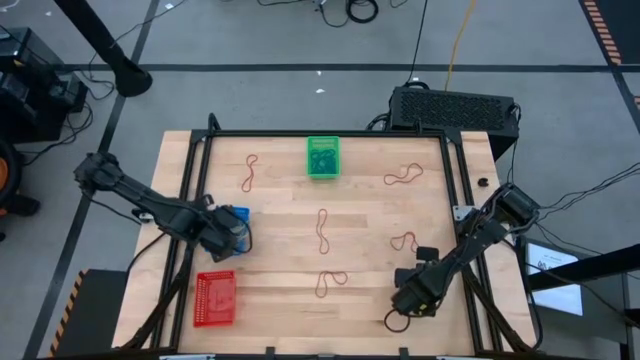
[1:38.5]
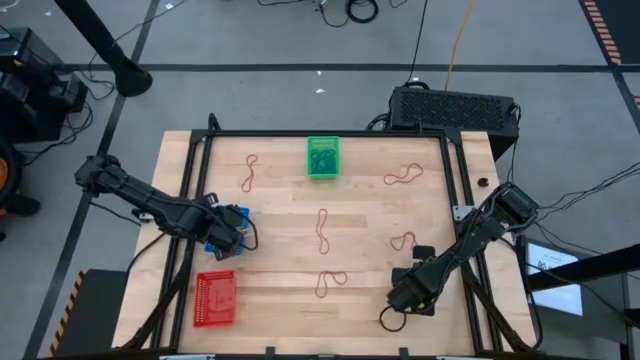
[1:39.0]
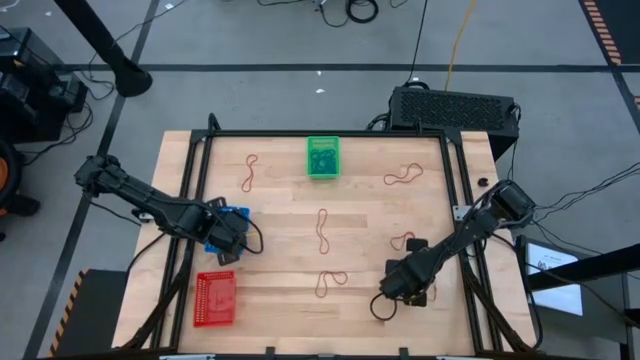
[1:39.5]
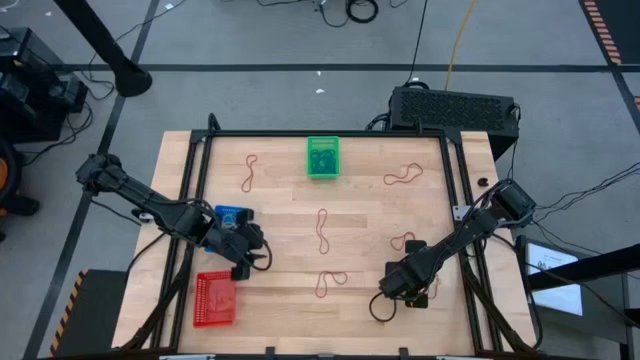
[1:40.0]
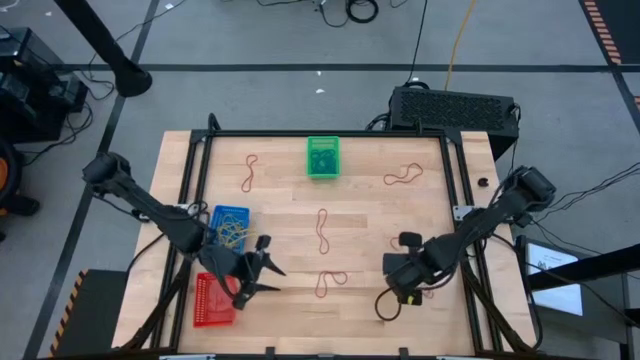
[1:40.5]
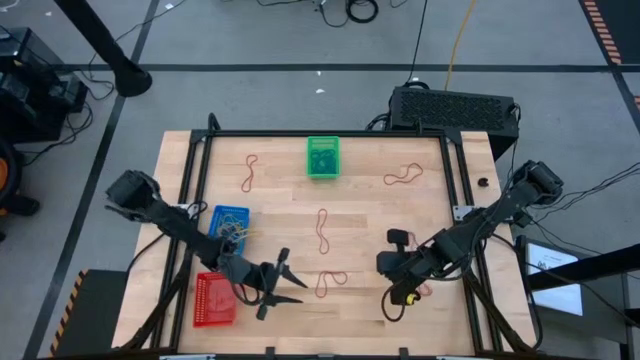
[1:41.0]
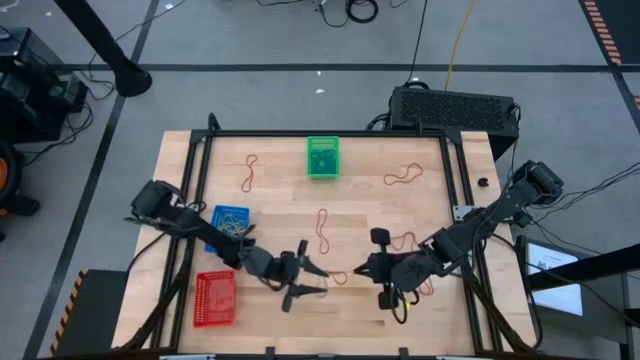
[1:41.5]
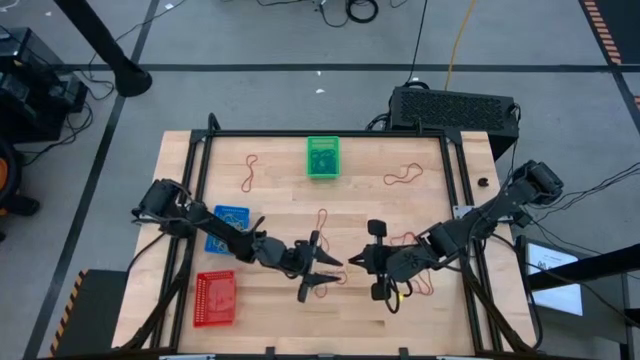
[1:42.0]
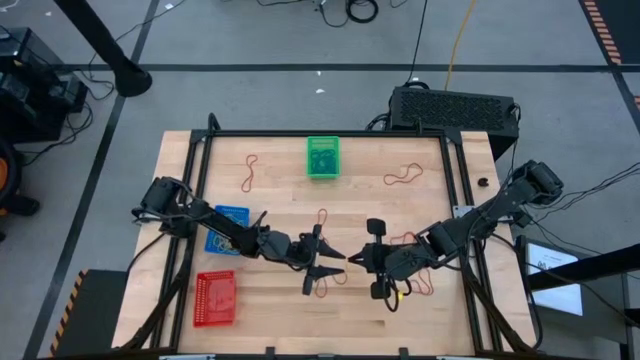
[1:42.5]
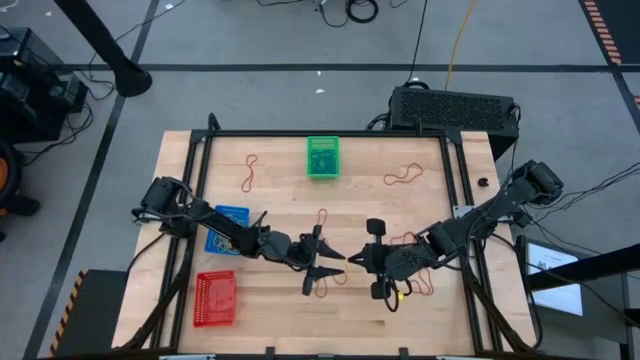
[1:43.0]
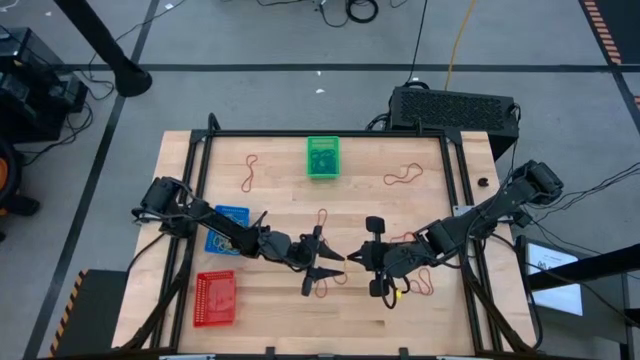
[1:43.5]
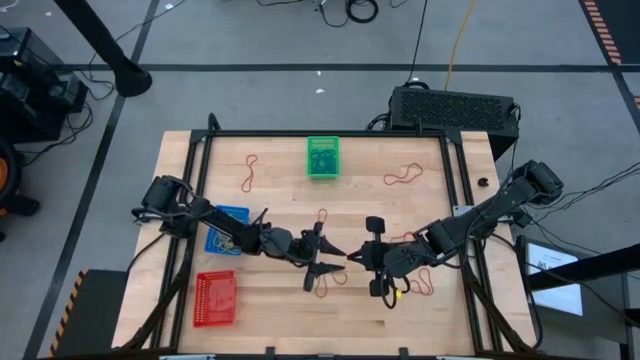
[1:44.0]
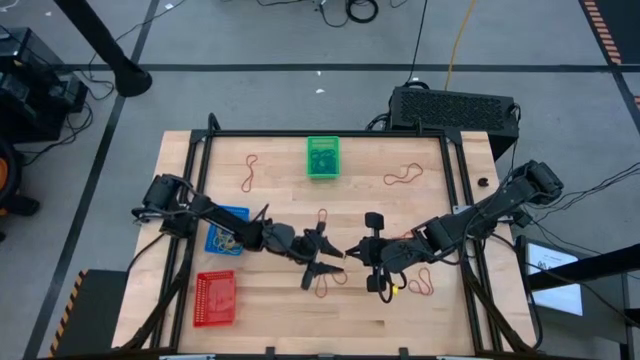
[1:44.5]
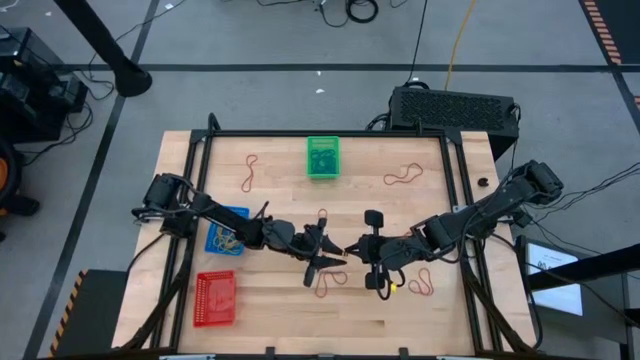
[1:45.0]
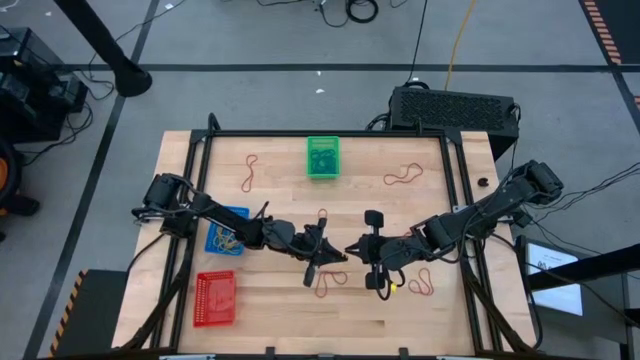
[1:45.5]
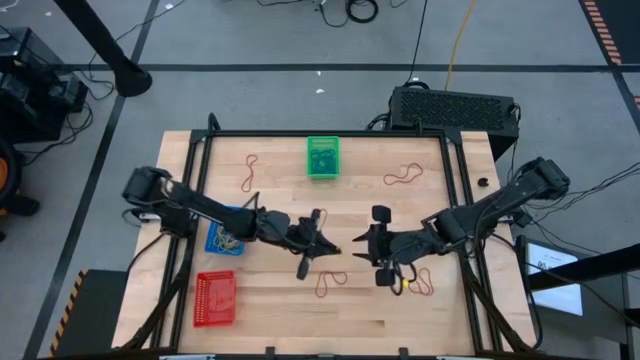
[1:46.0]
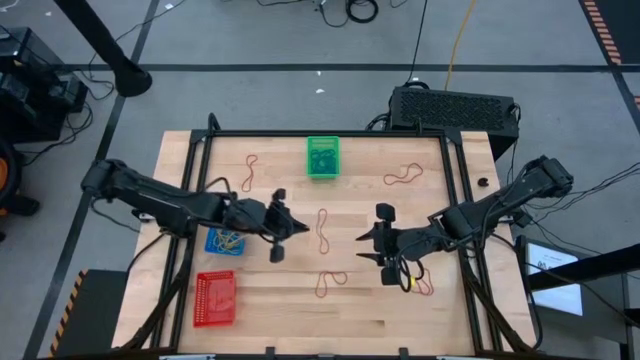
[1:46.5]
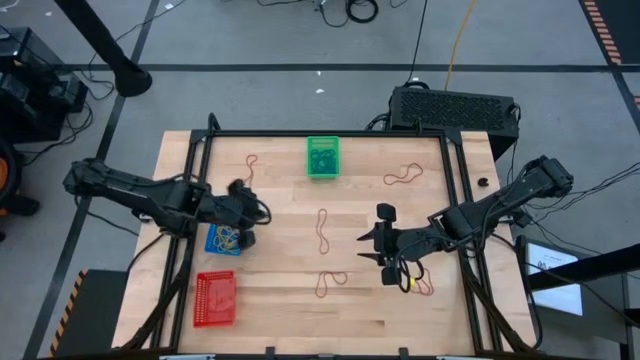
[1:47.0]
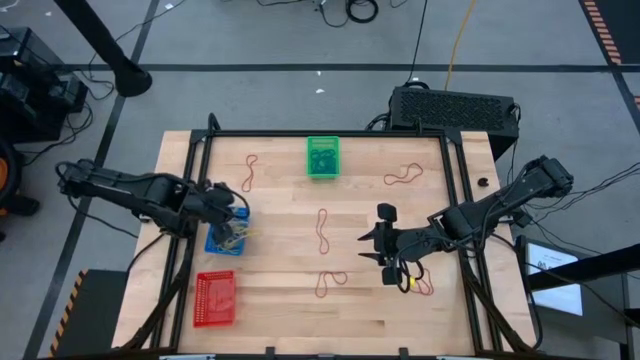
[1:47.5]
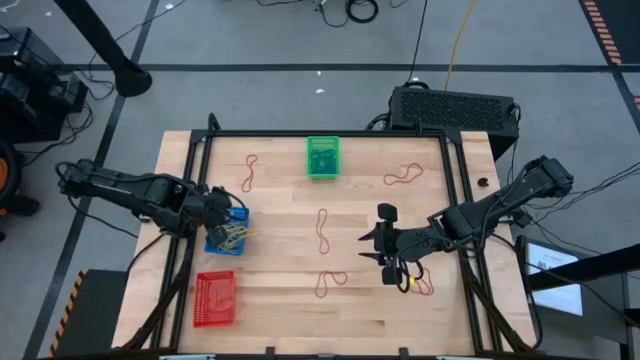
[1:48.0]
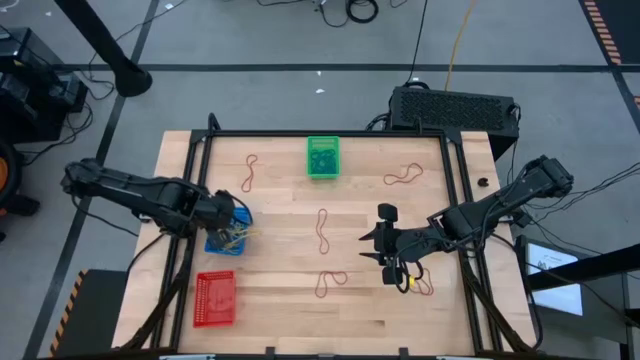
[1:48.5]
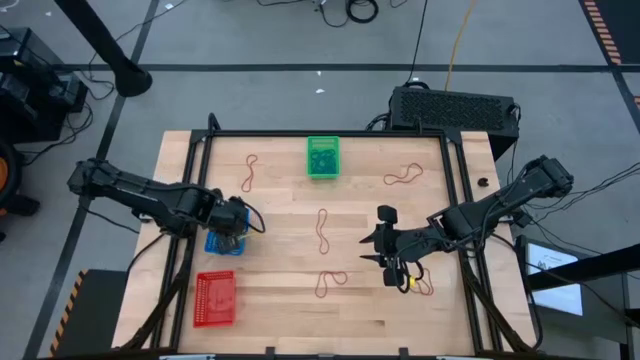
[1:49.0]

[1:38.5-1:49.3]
Task: Sort rubber bands into baskets
Put the yellow rubber band into the blue bin

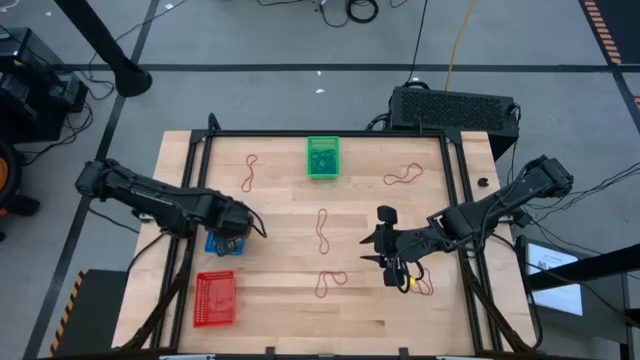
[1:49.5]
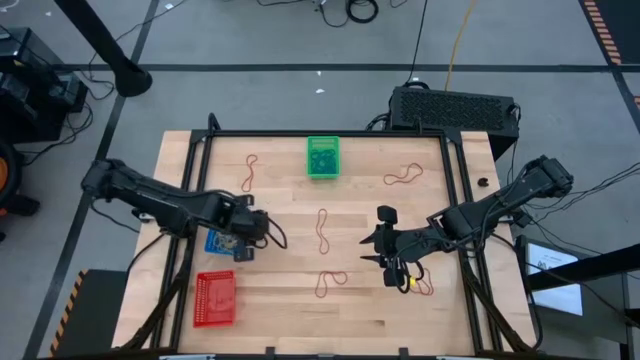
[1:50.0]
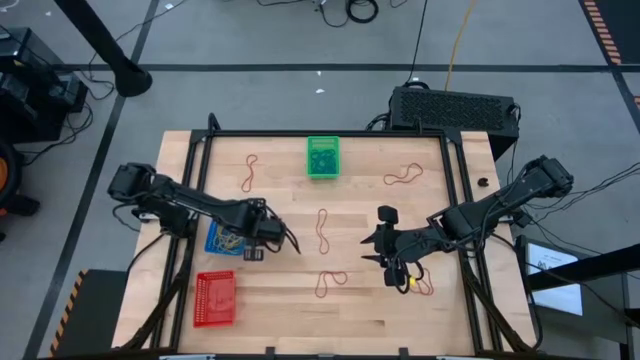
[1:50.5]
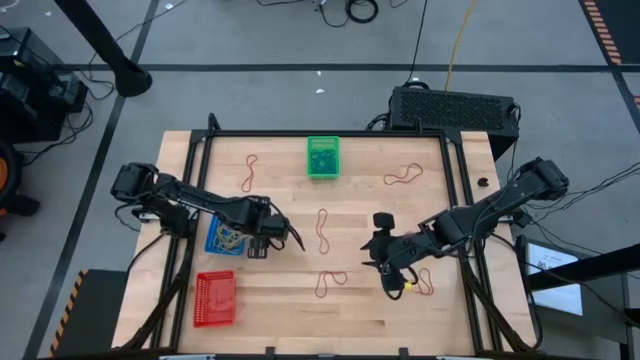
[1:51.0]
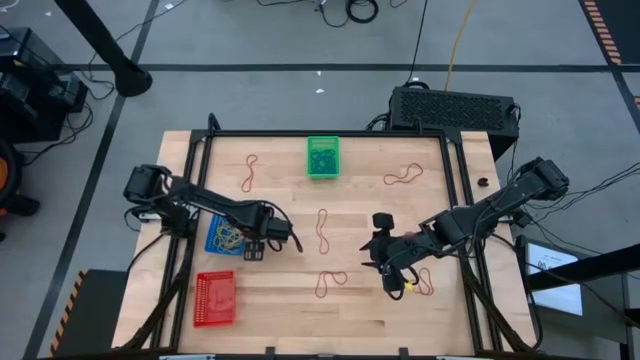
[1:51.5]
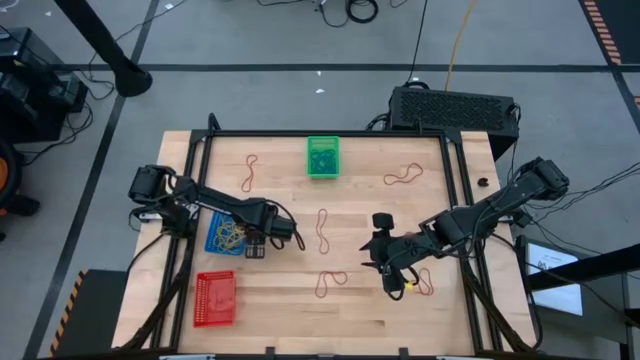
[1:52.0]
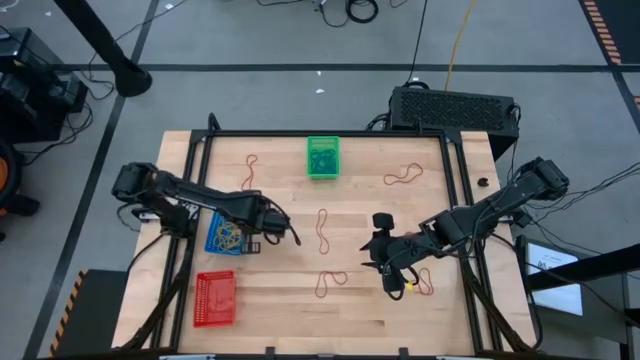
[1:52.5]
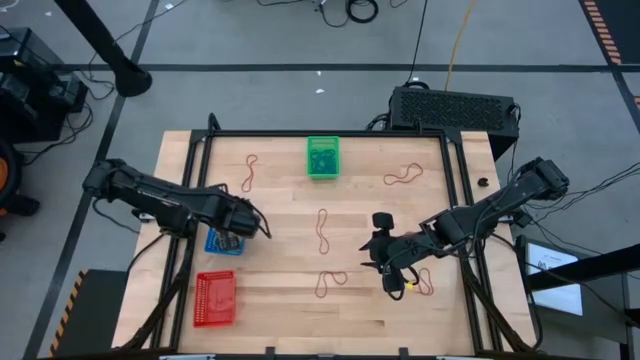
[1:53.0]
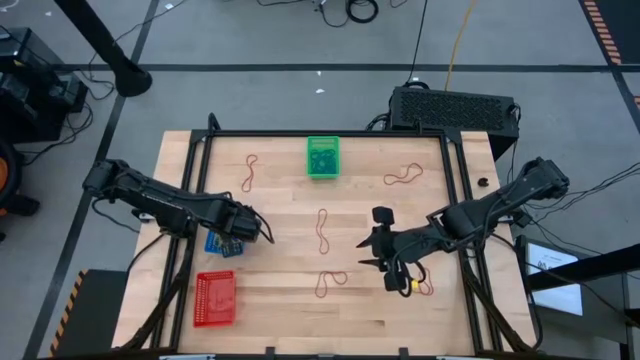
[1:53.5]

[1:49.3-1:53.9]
Adjust the yellow rubber bands in the blue bin

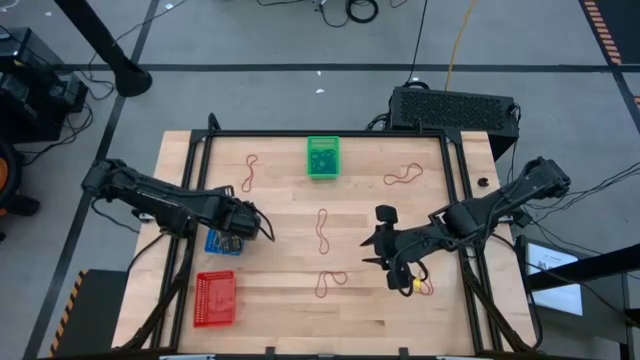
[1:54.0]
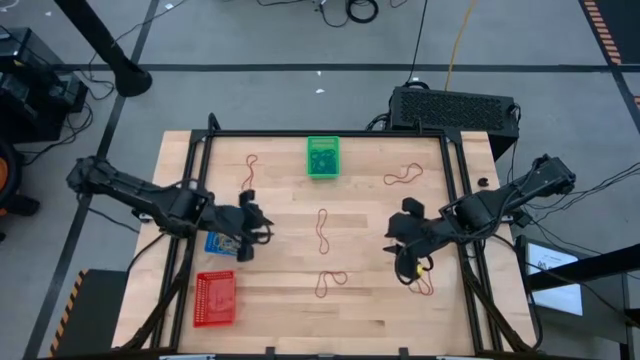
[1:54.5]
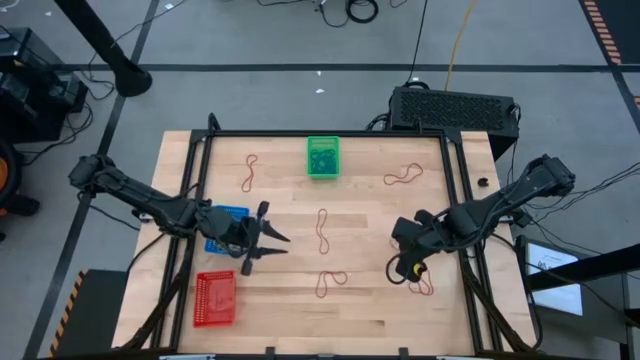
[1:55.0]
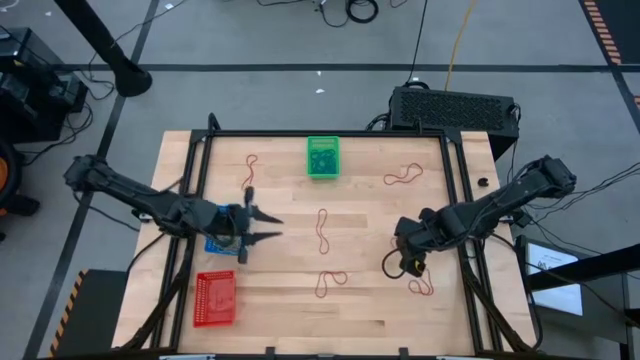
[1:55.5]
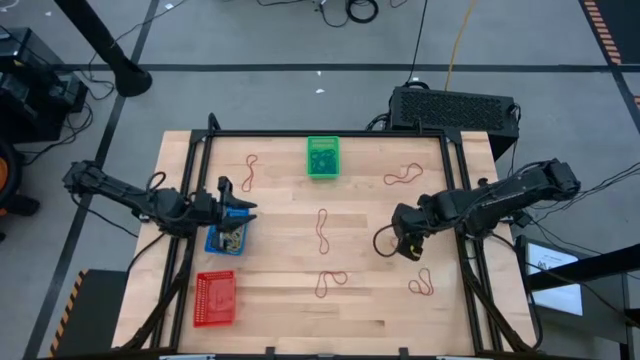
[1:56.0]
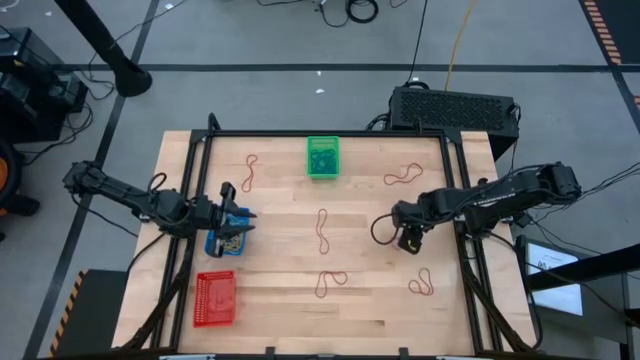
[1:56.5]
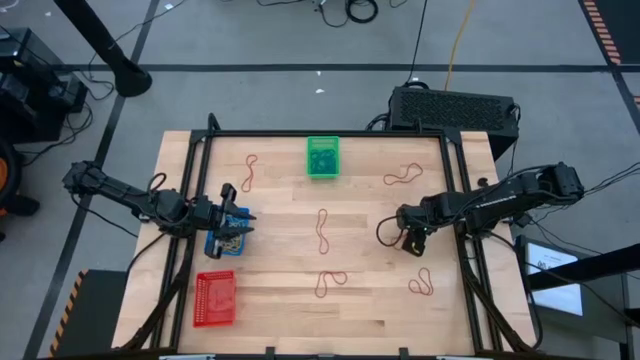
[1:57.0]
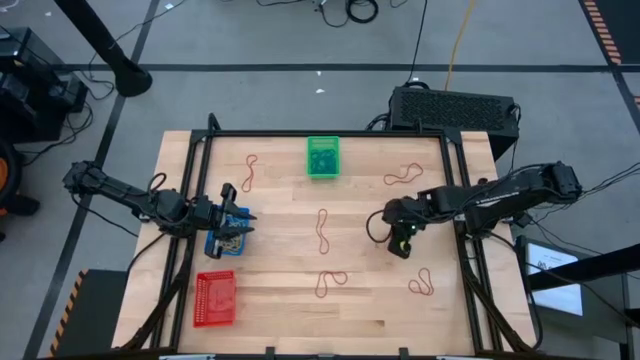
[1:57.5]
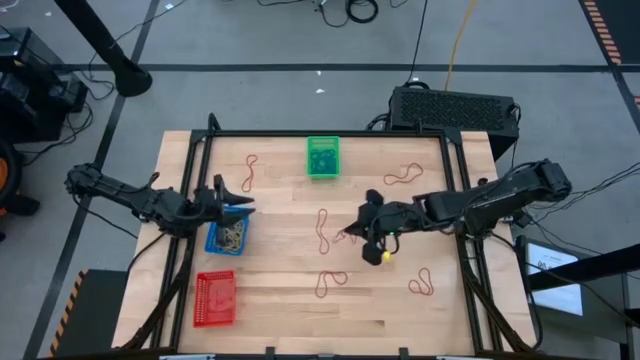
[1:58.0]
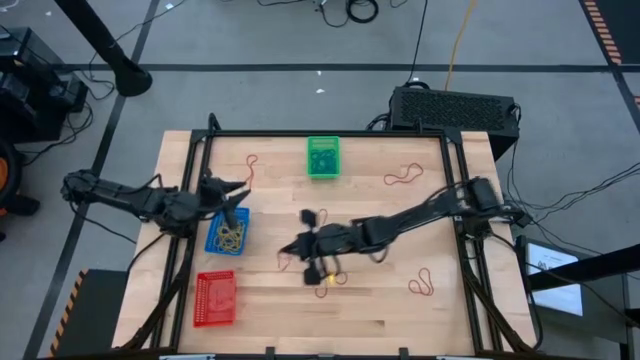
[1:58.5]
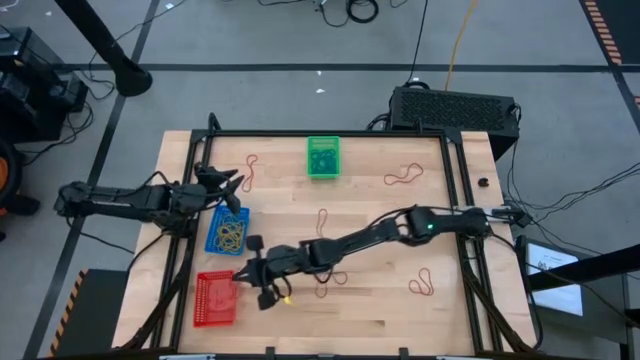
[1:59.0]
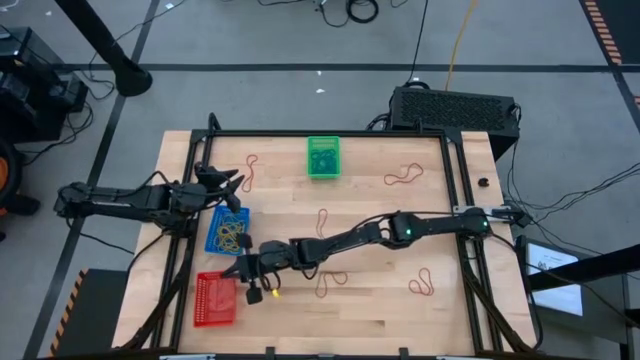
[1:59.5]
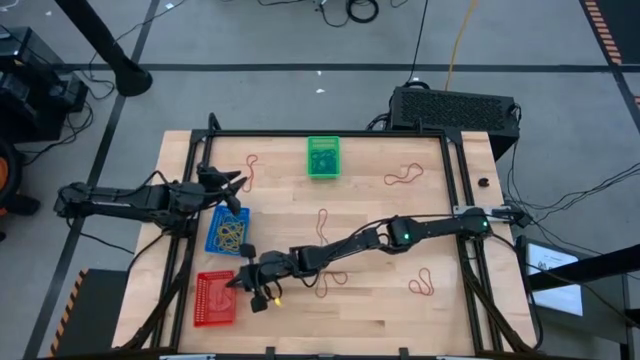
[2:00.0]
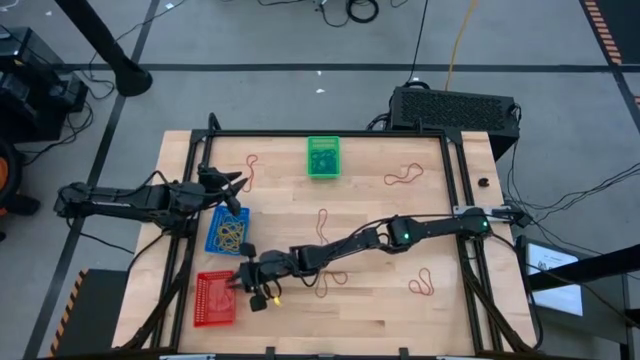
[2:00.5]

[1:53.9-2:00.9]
Put the red rubber band into the red bin
